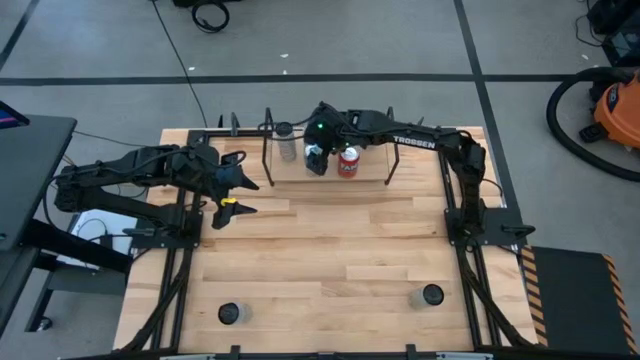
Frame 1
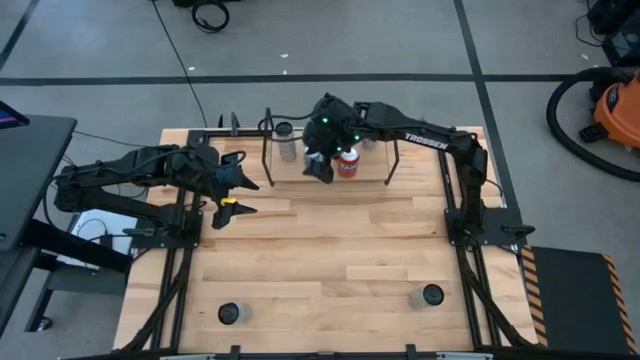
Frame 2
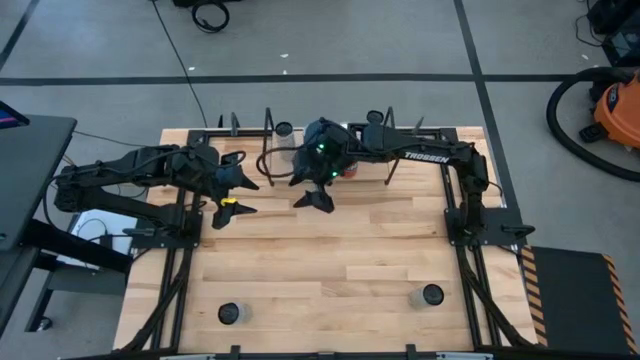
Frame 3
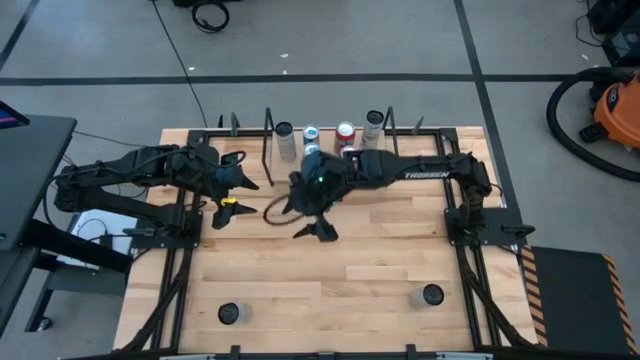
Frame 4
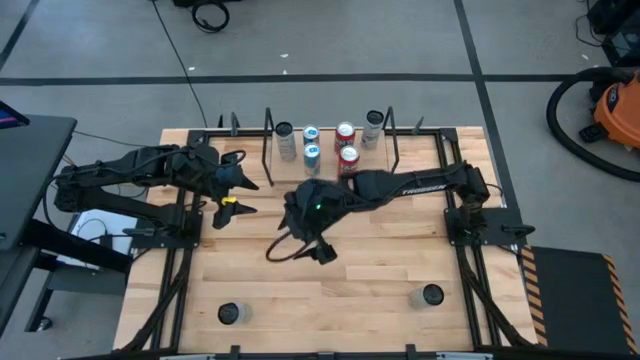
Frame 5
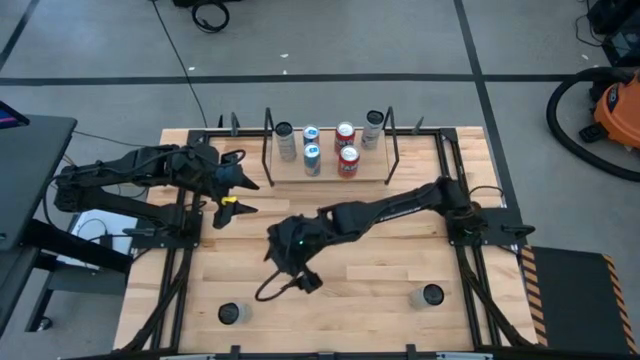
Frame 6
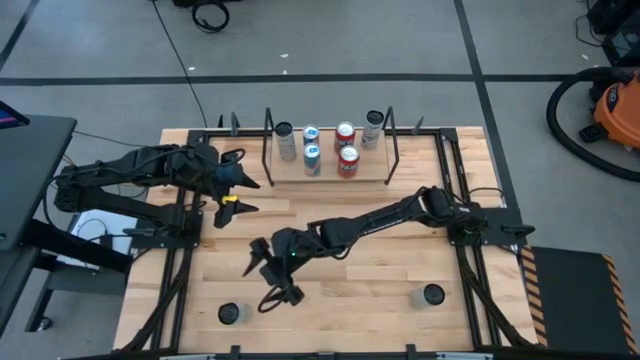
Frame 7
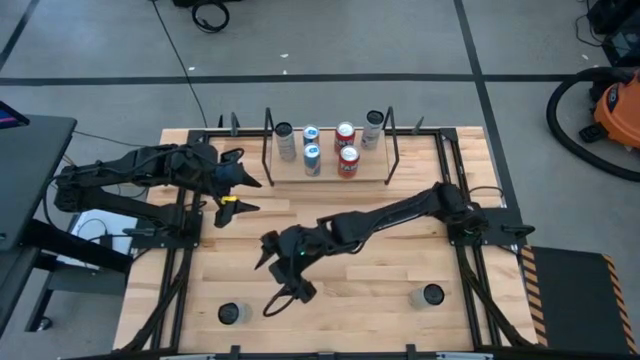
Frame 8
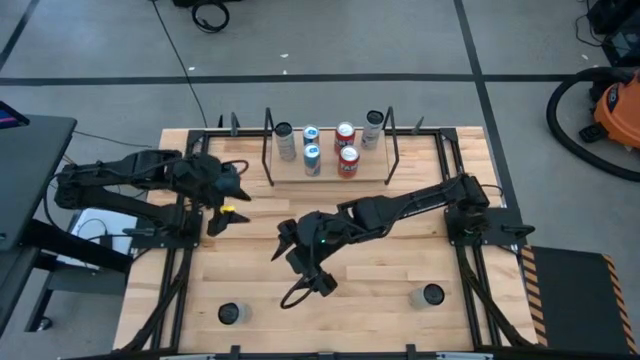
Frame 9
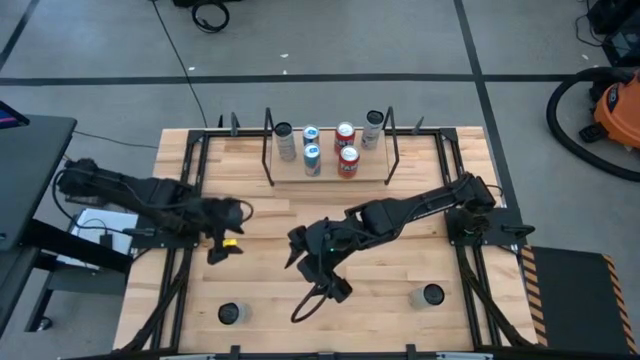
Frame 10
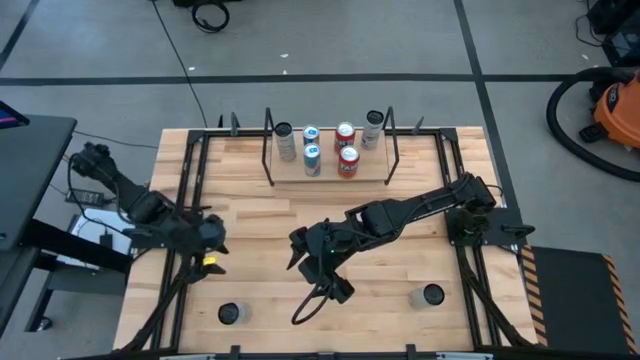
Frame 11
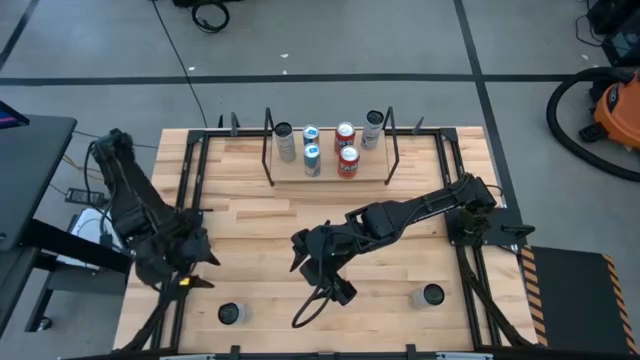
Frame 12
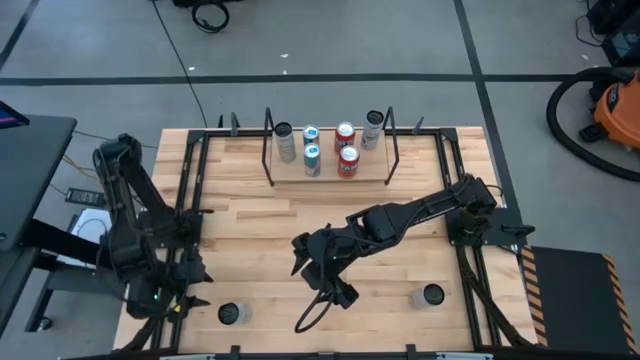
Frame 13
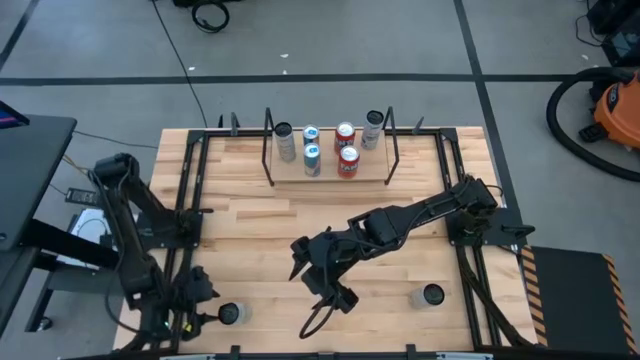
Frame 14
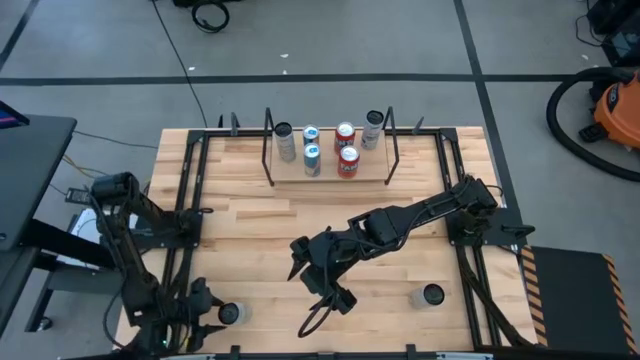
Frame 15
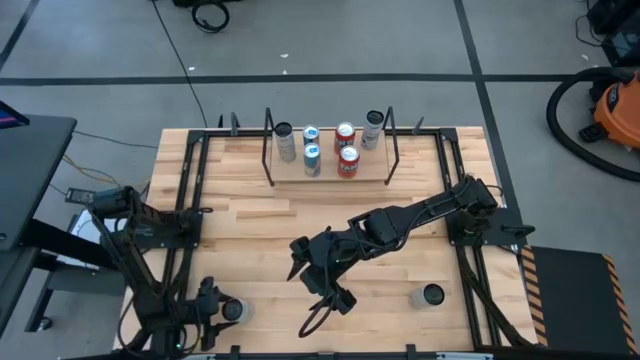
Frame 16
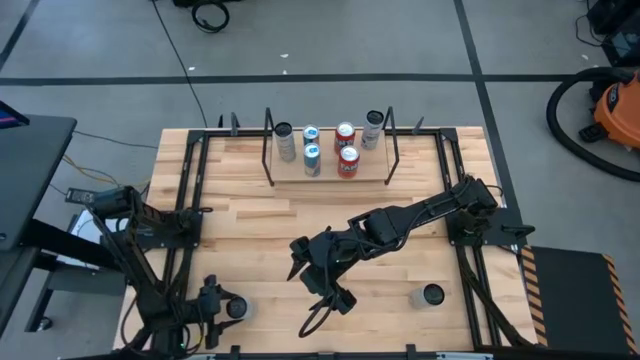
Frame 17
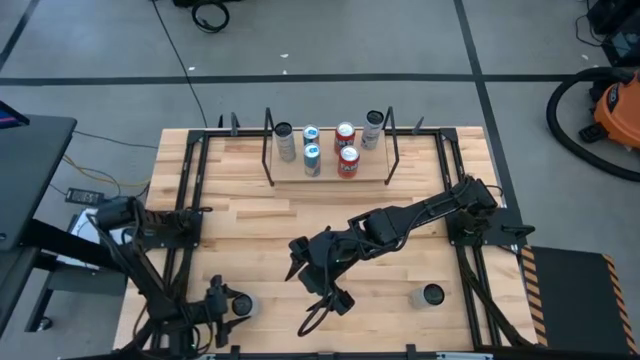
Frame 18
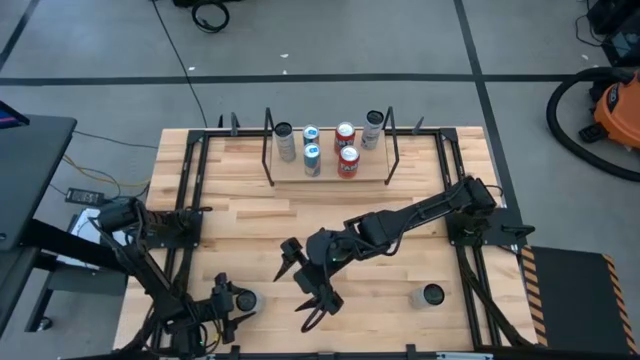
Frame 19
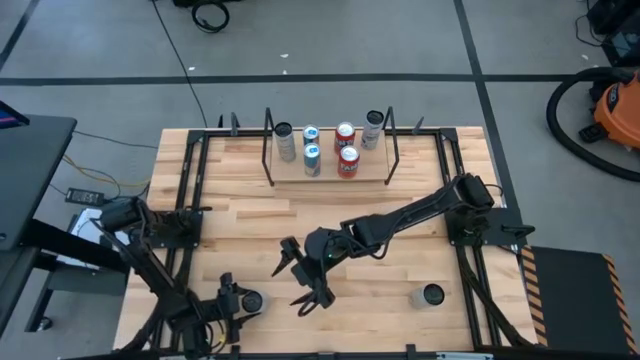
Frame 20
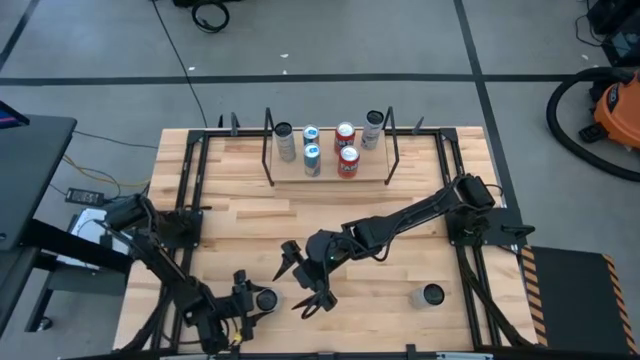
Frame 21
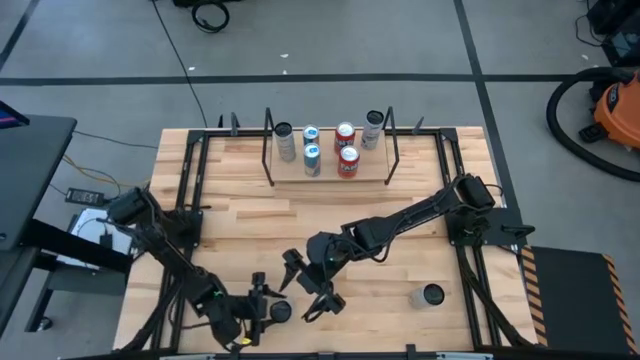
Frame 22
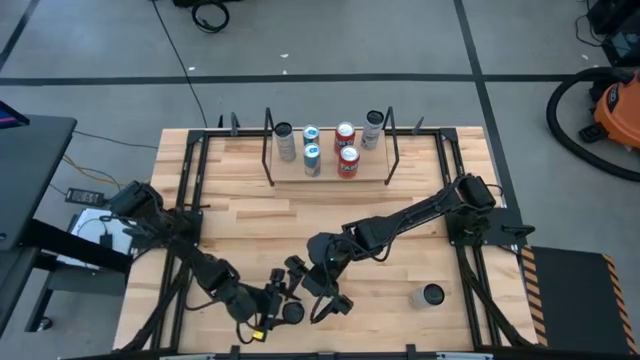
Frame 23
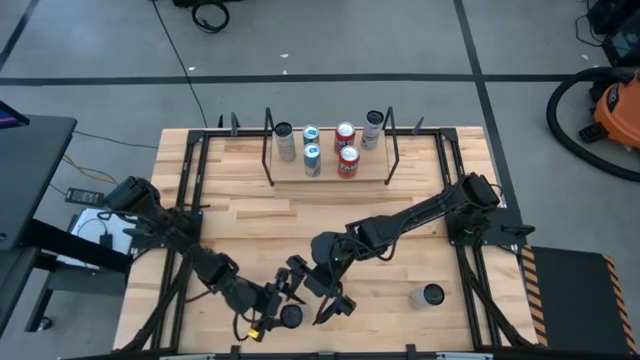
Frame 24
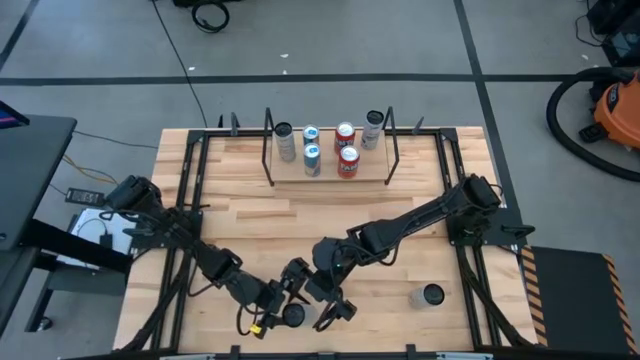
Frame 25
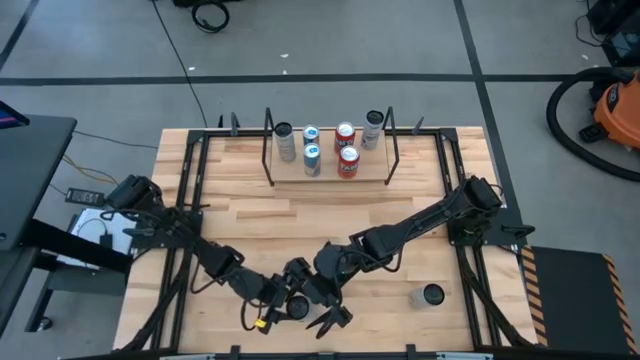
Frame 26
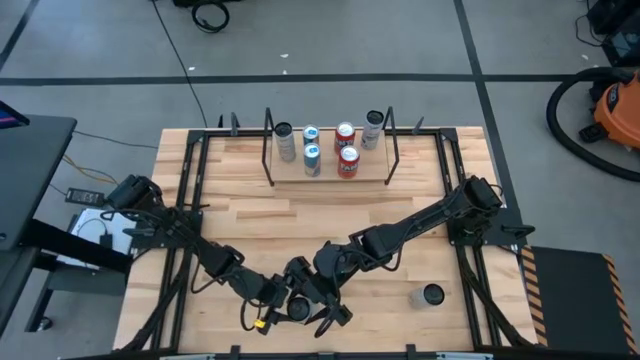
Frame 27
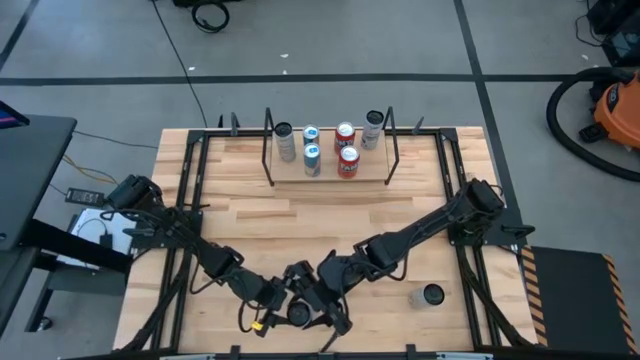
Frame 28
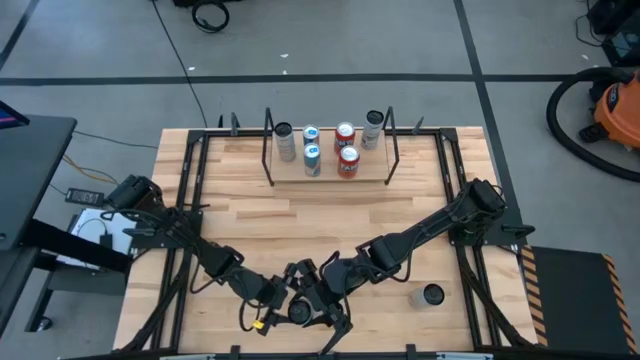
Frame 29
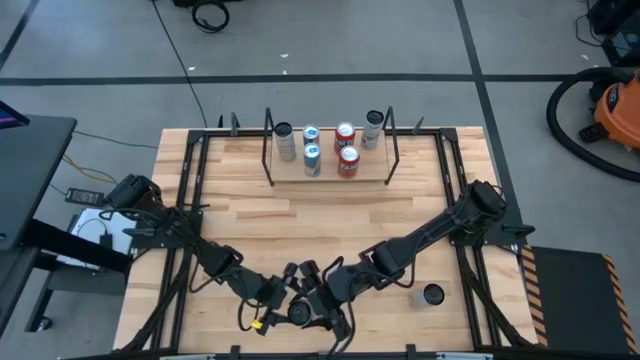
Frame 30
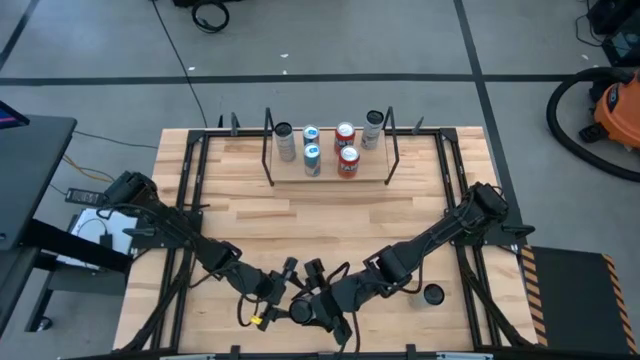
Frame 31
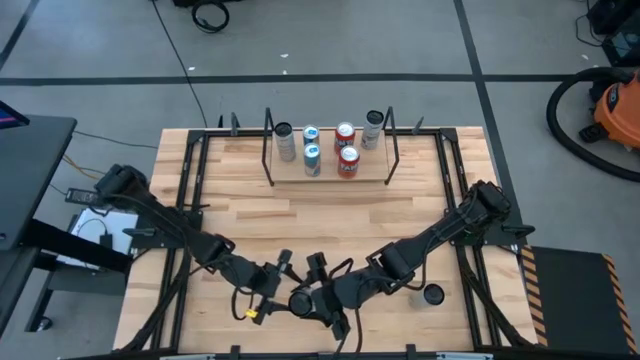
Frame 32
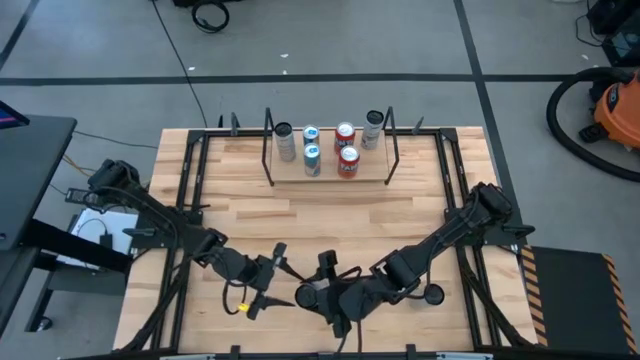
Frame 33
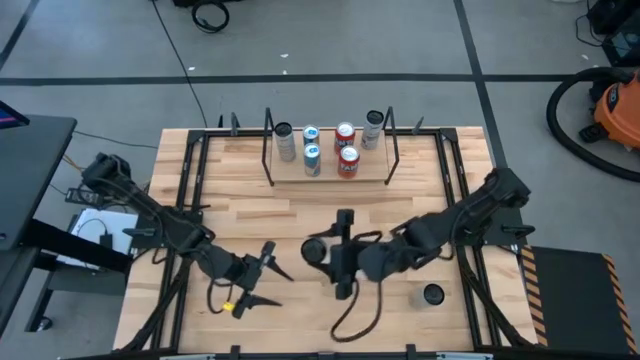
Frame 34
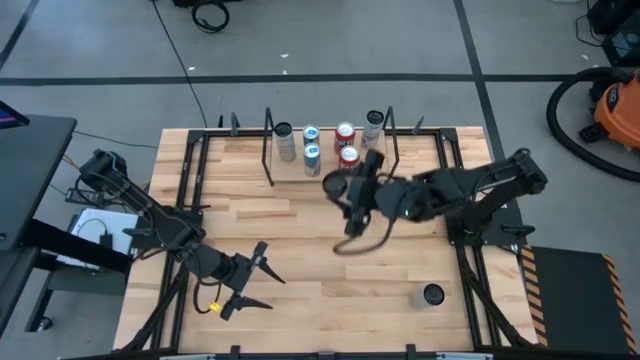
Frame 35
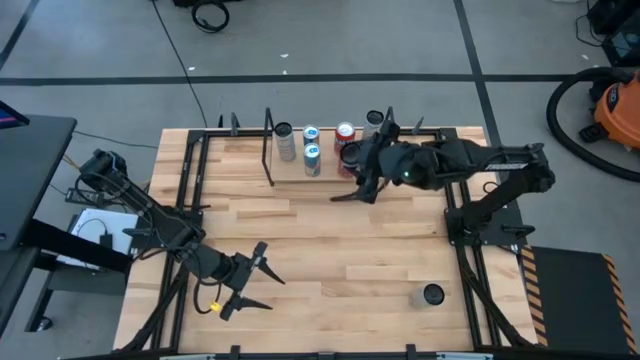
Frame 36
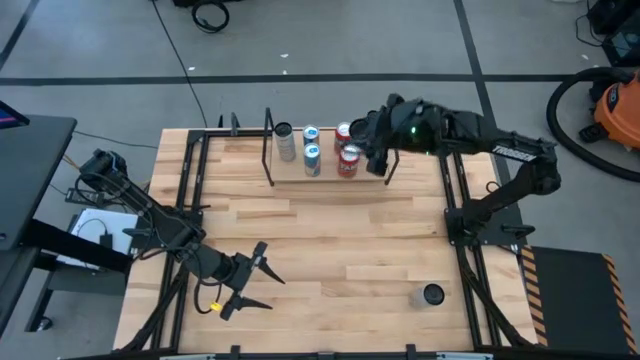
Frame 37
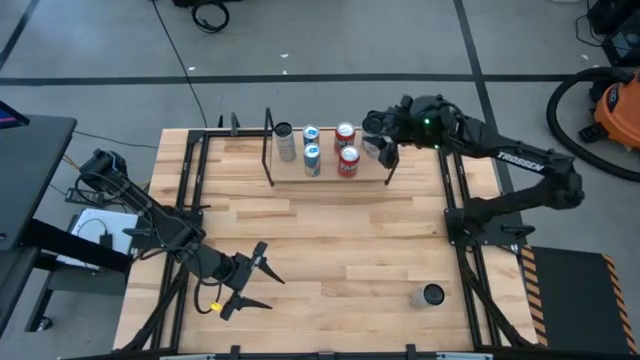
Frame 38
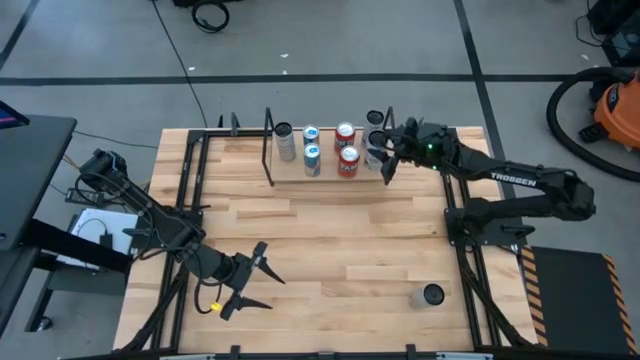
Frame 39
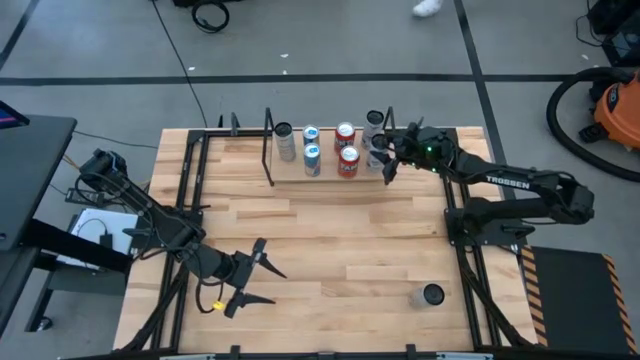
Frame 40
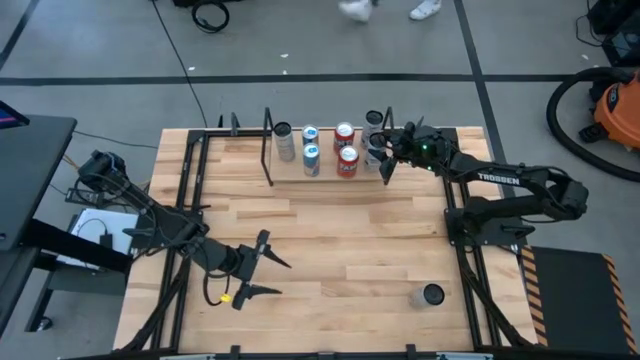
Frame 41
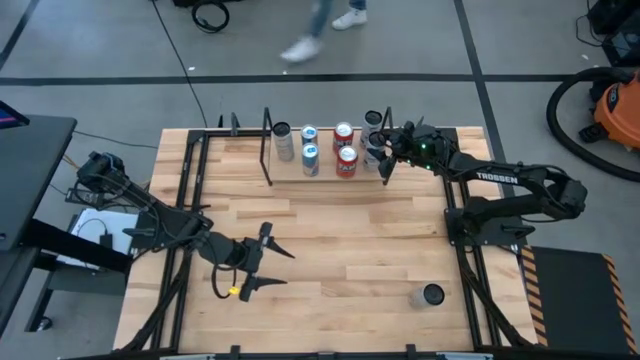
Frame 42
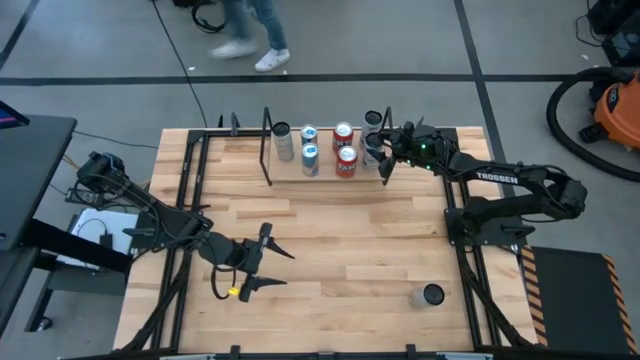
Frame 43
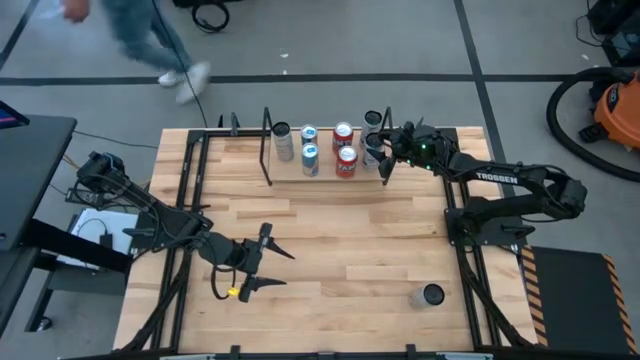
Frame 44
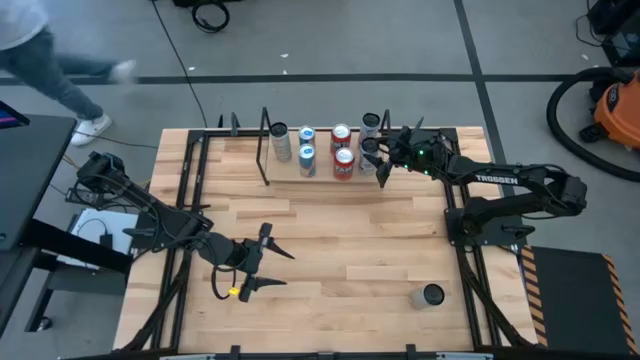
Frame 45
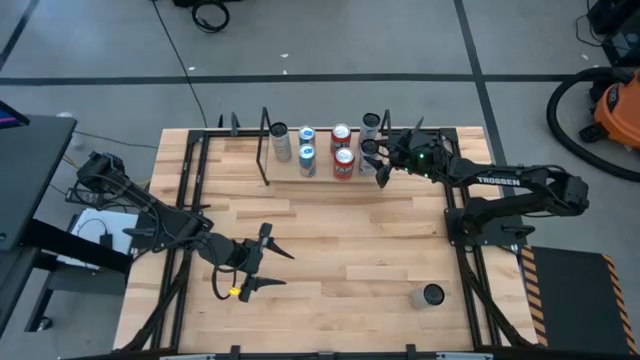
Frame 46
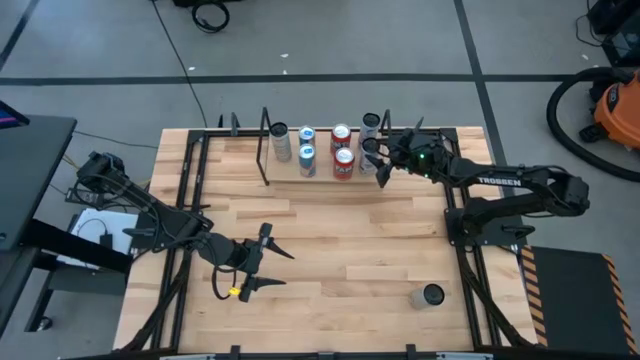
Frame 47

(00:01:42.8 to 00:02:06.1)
Task: Place canned beverage on shelf
Put the white blue soda can aligned with the other white blue soda can
